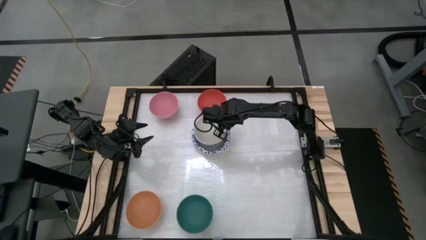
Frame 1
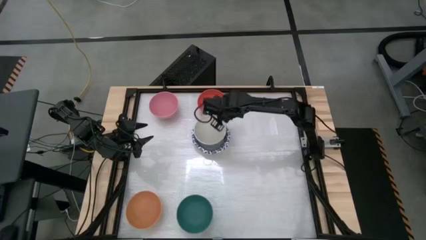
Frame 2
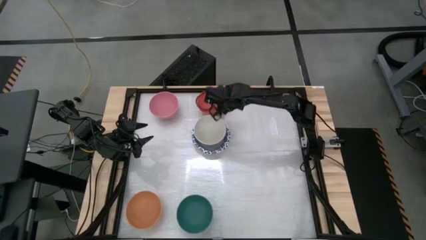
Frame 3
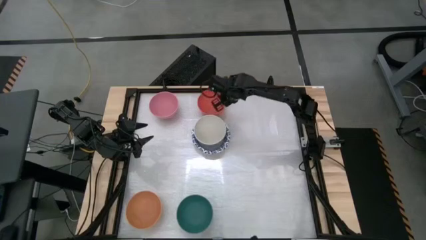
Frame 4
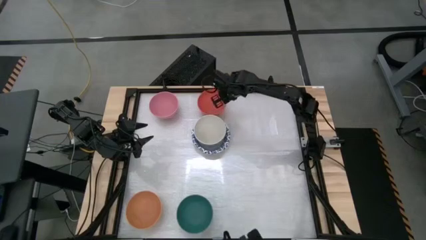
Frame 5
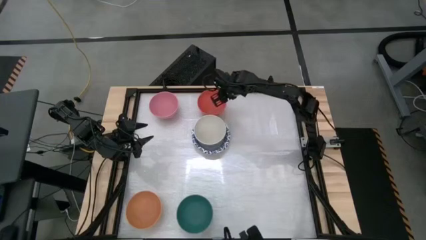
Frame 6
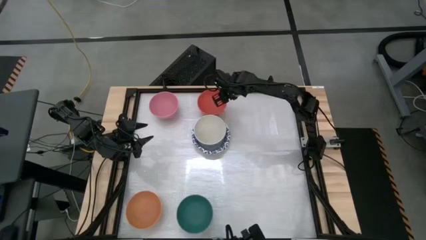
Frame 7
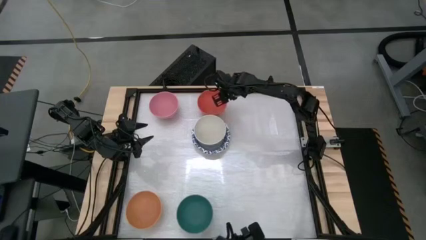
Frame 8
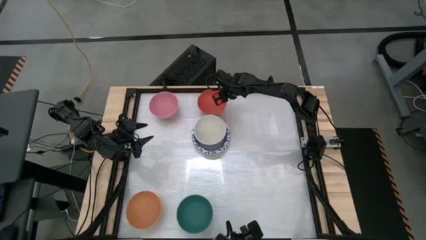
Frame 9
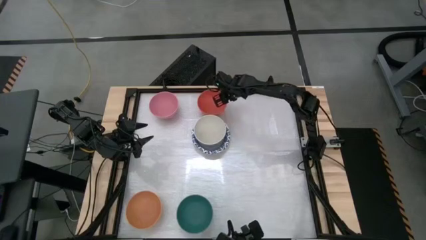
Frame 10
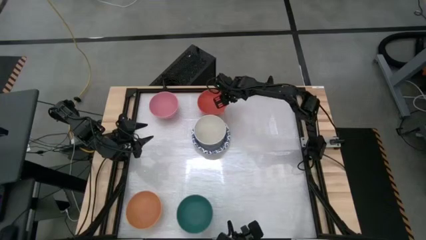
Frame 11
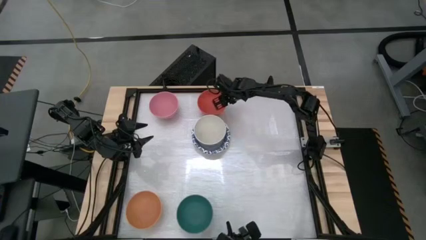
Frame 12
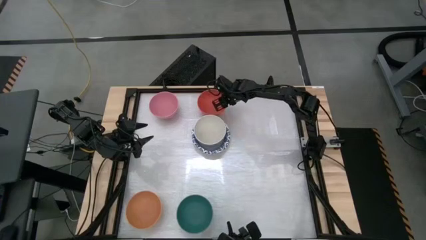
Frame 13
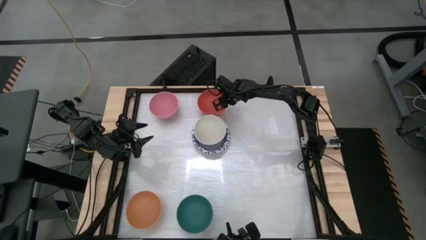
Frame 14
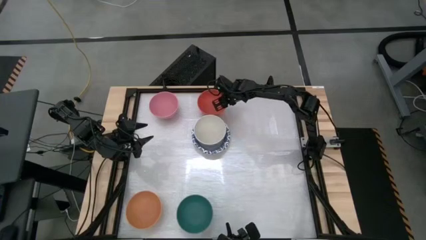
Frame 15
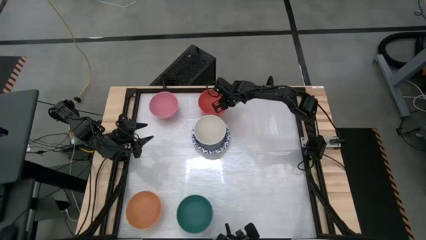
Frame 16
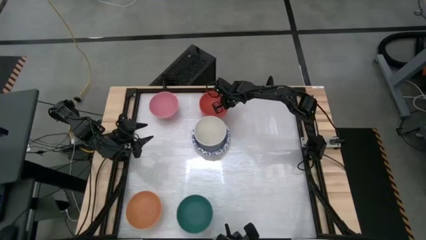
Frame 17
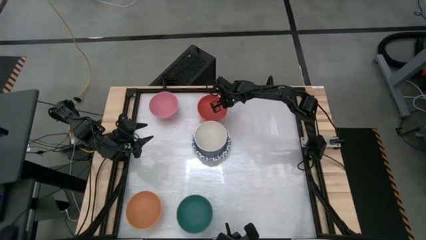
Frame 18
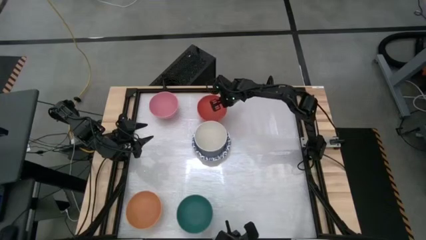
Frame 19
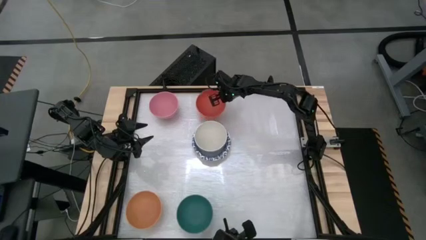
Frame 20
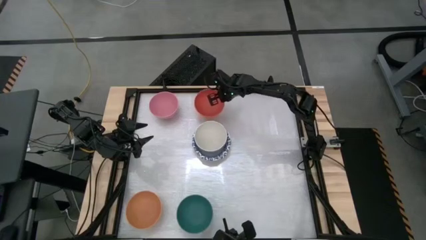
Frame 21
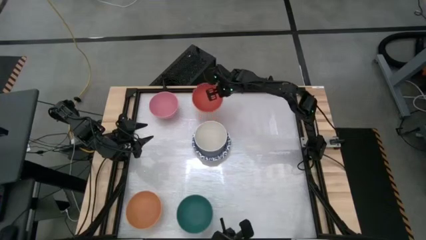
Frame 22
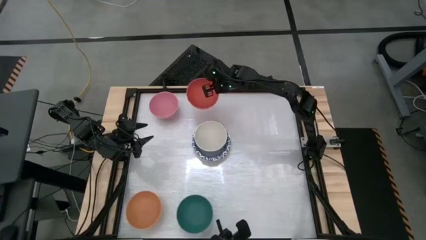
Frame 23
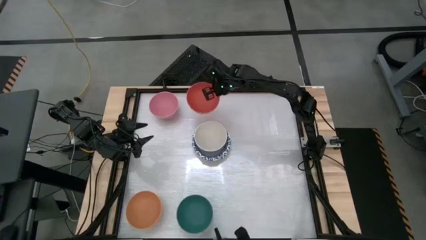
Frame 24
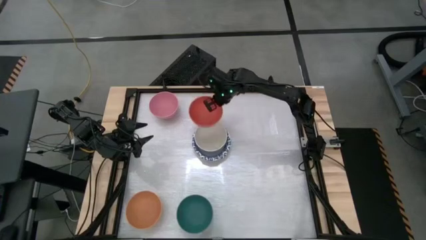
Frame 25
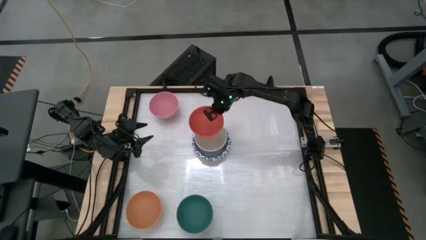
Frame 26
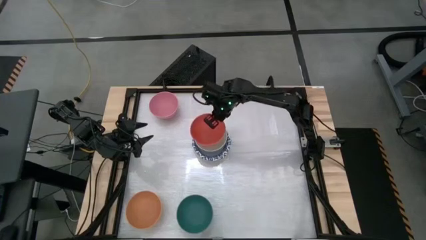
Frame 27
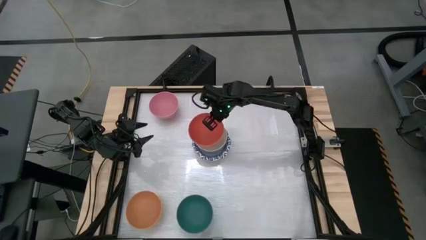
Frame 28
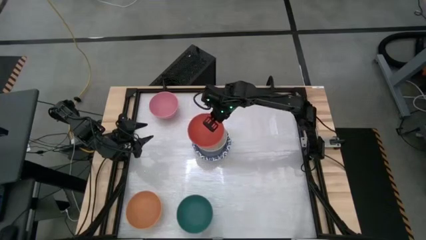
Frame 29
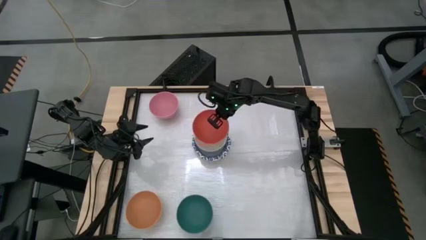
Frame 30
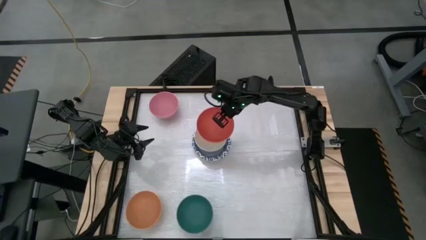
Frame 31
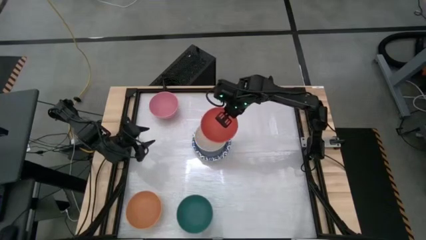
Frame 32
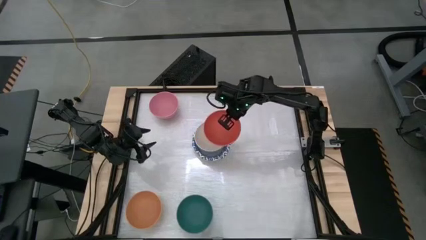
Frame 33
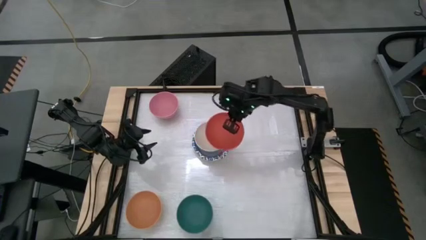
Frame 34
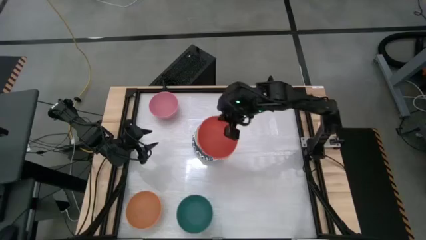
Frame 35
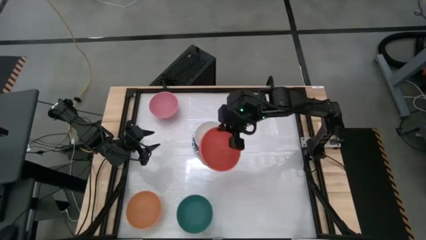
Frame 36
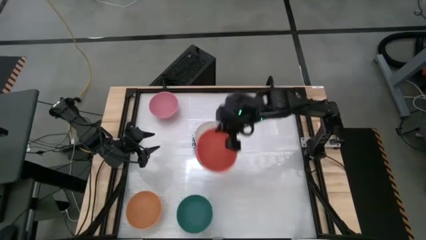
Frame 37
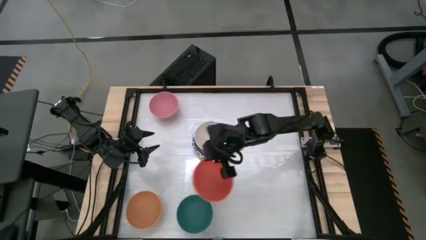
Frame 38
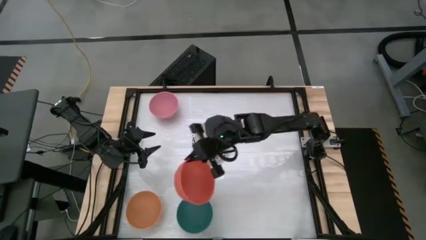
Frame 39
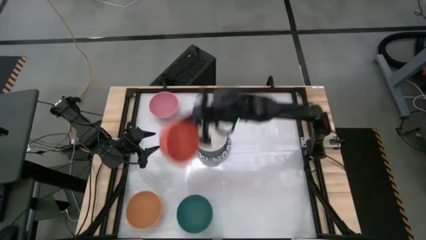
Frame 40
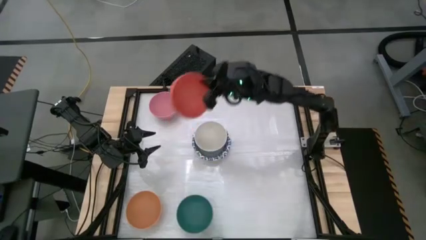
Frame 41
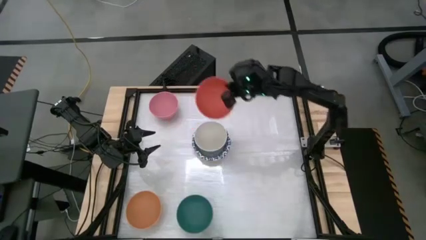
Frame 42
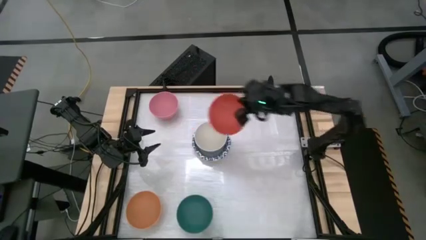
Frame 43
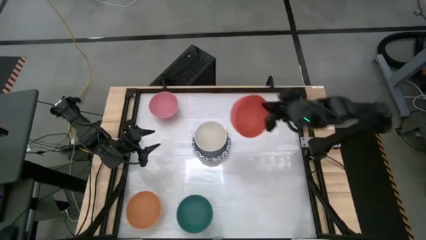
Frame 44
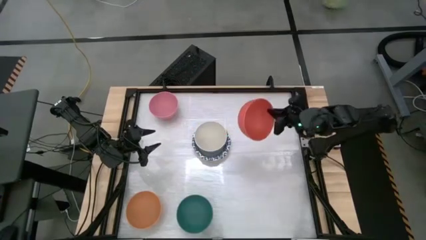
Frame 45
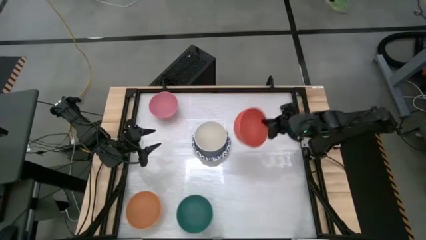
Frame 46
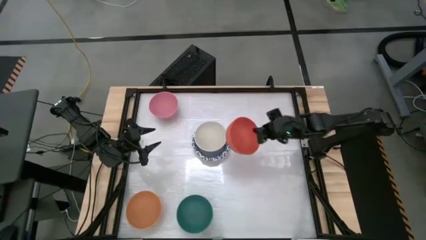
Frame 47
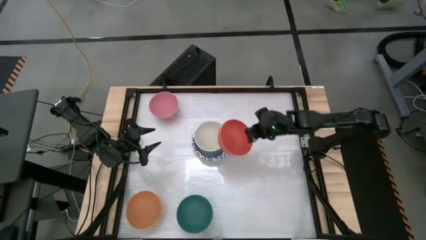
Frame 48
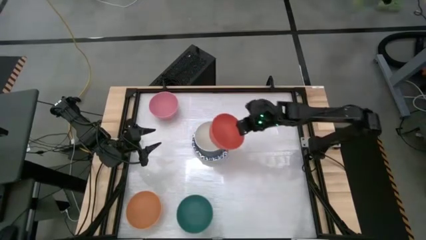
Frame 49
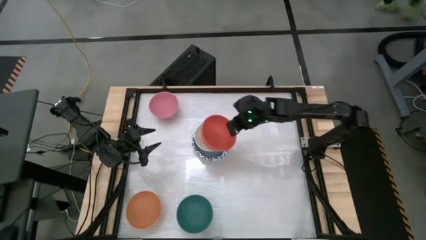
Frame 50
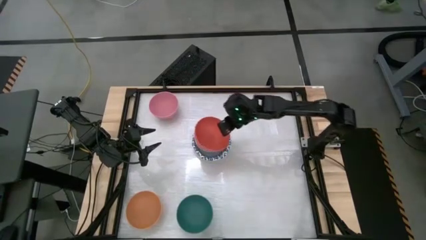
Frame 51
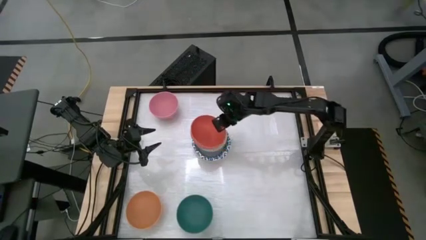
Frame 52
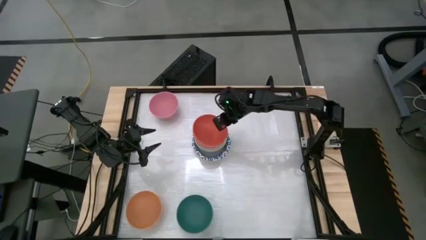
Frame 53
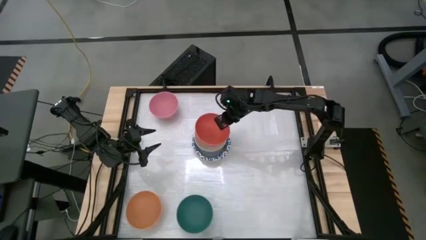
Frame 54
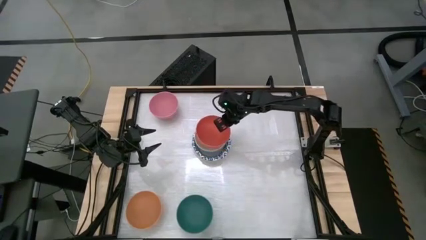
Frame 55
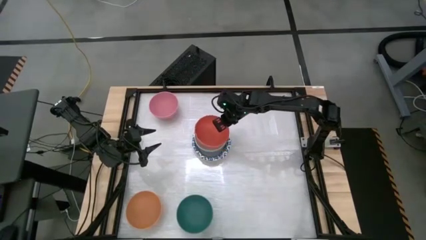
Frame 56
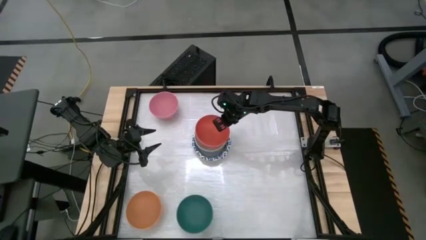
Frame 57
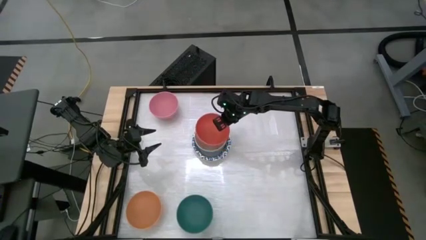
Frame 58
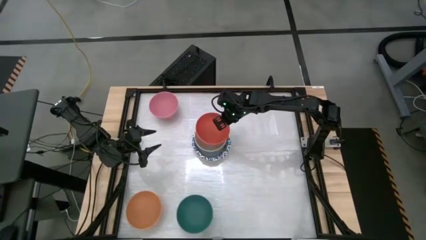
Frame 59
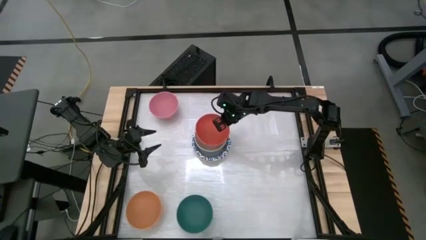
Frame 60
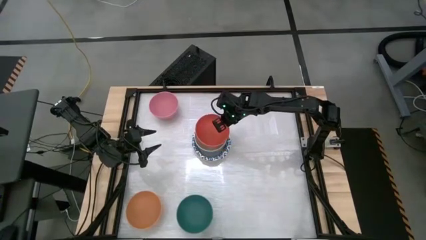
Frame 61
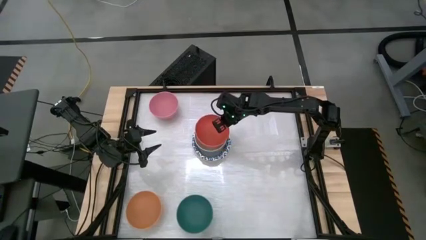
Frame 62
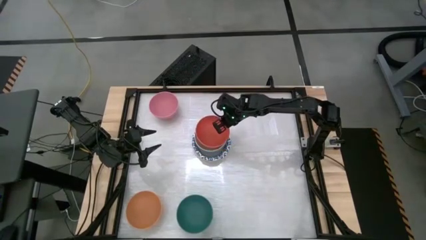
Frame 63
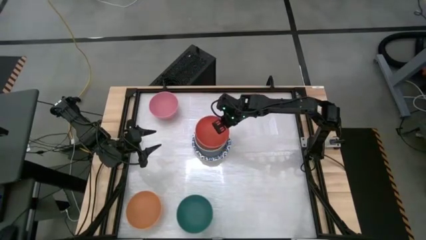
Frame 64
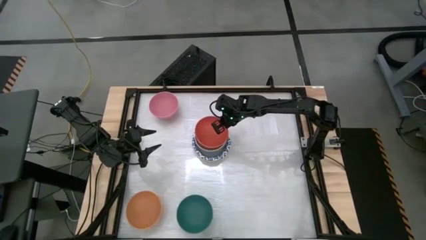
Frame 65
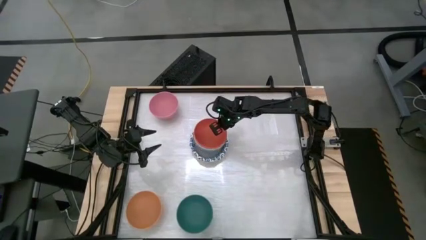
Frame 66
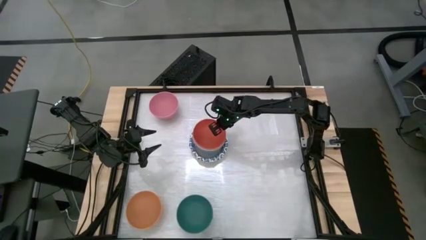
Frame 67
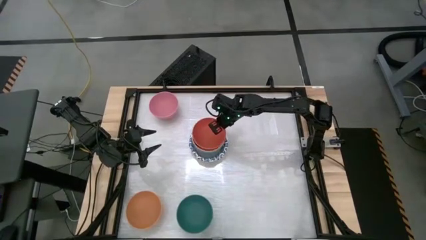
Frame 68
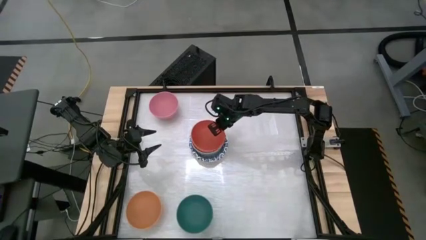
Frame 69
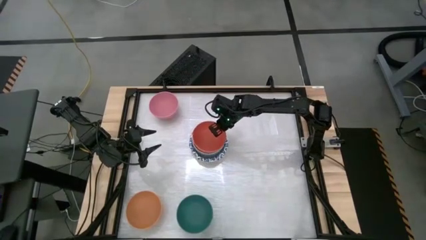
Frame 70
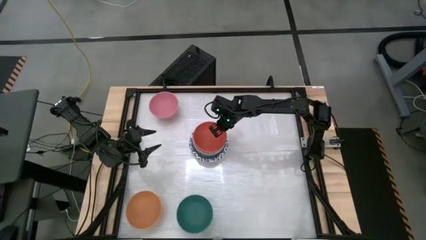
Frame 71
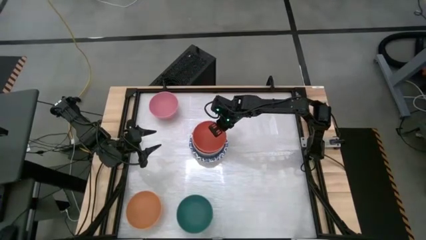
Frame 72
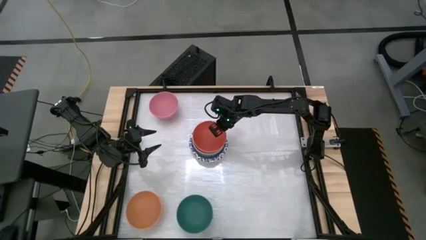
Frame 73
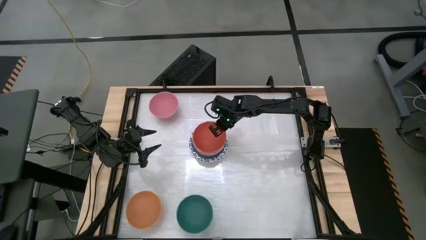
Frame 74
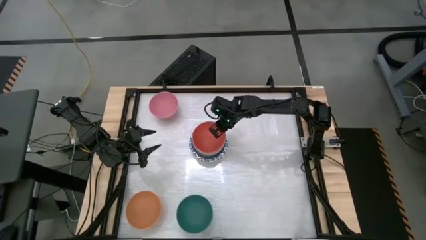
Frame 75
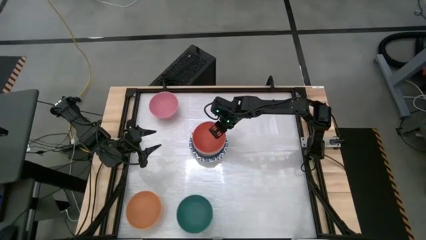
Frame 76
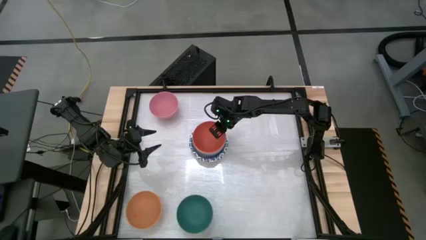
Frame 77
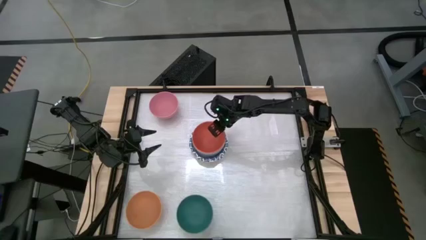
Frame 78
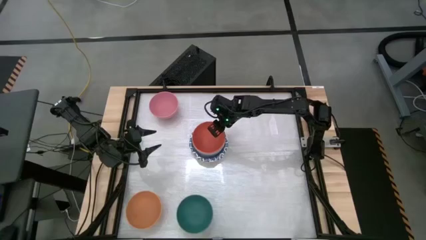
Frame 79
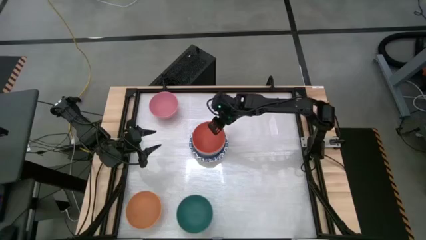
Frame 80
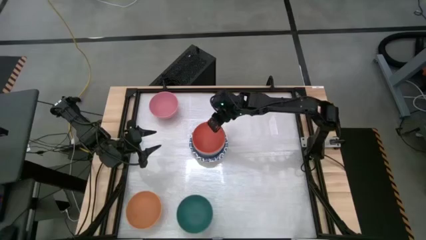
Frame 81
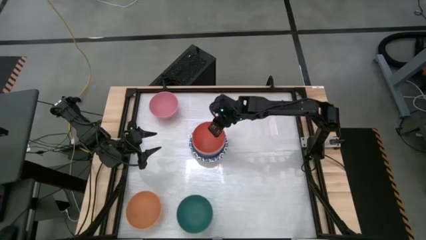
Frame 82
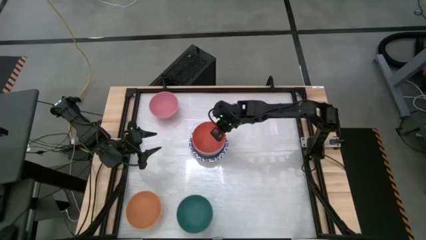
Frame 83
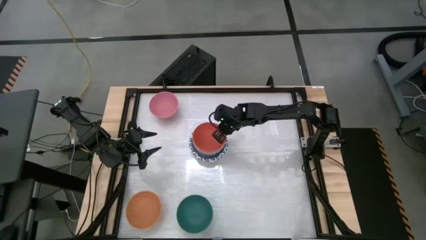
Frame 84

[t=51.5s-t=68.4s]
Stack the orange bowl on top of the white bowl
